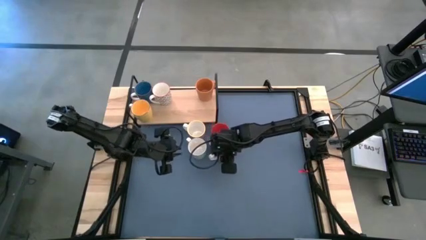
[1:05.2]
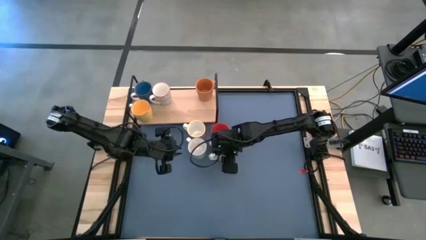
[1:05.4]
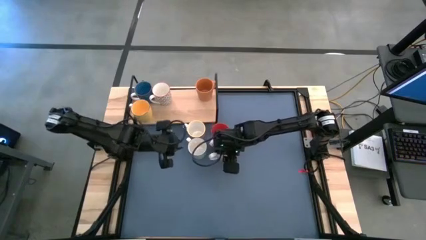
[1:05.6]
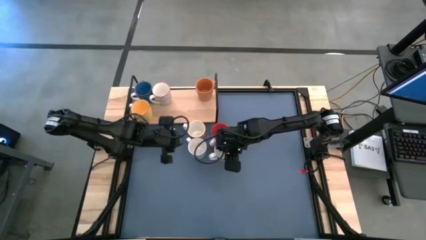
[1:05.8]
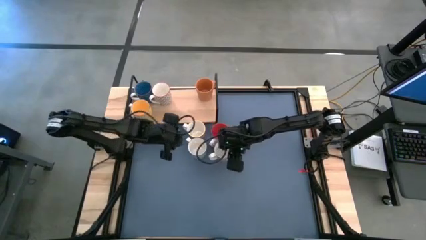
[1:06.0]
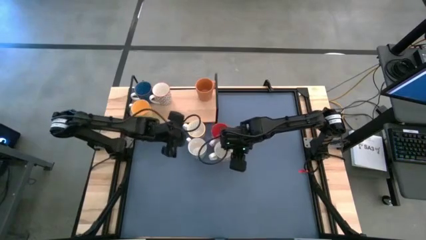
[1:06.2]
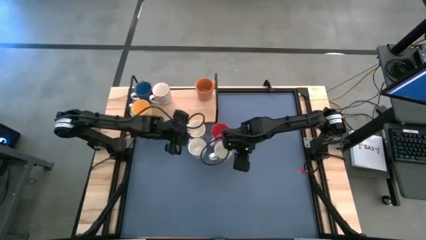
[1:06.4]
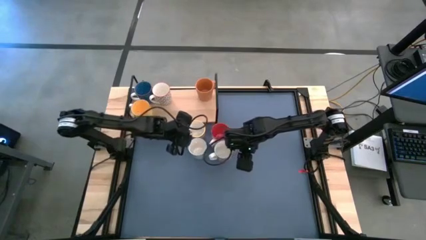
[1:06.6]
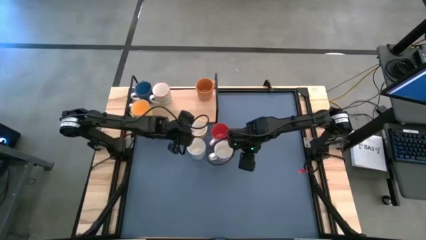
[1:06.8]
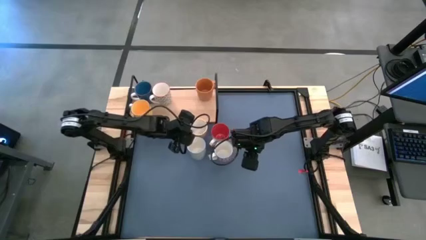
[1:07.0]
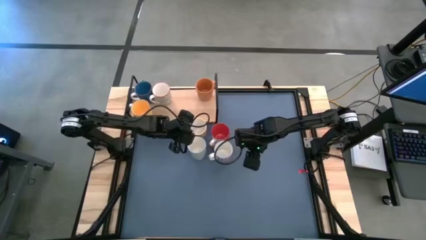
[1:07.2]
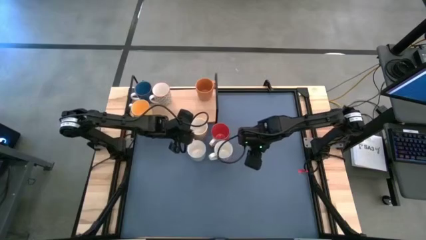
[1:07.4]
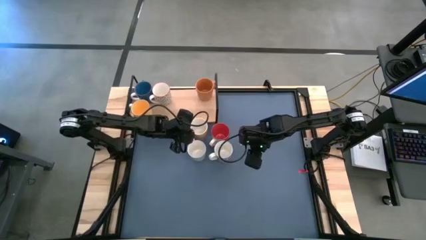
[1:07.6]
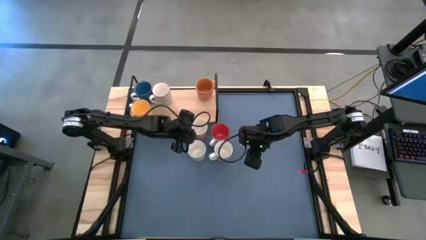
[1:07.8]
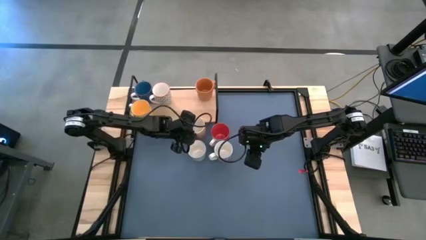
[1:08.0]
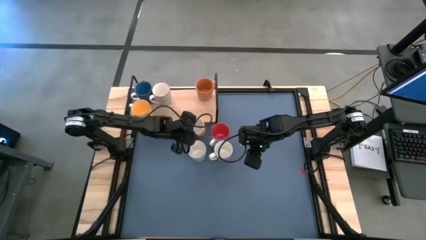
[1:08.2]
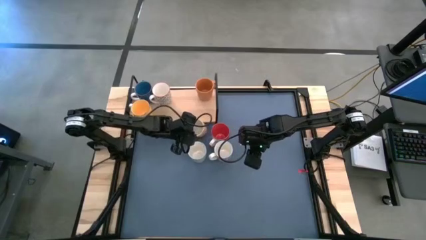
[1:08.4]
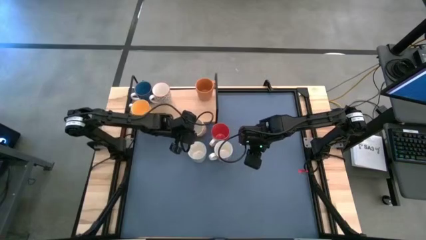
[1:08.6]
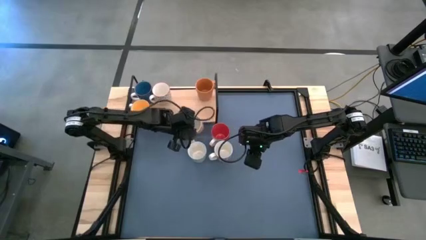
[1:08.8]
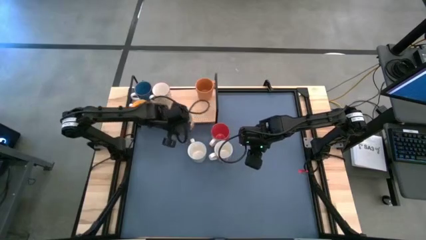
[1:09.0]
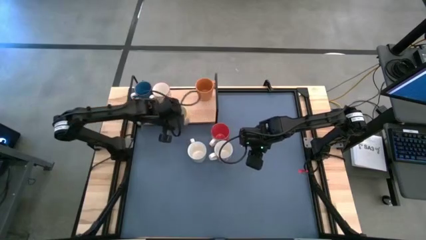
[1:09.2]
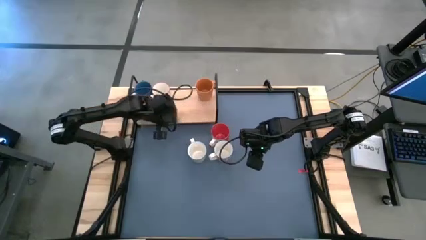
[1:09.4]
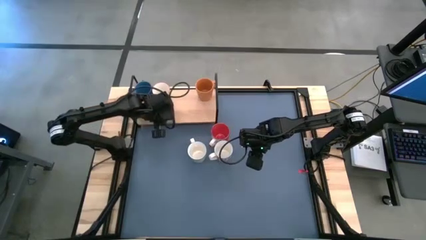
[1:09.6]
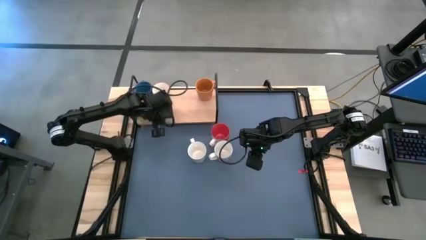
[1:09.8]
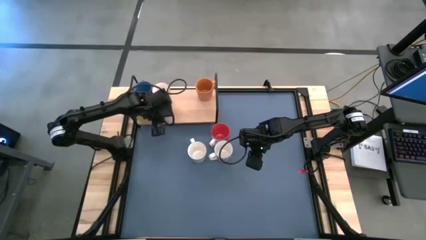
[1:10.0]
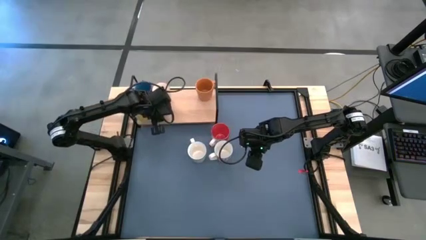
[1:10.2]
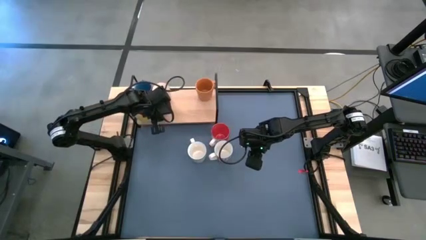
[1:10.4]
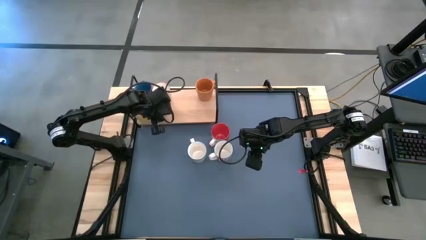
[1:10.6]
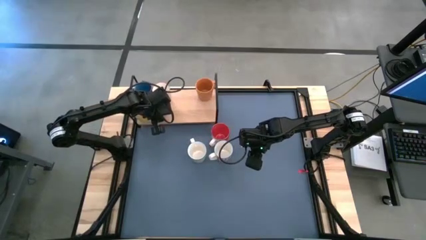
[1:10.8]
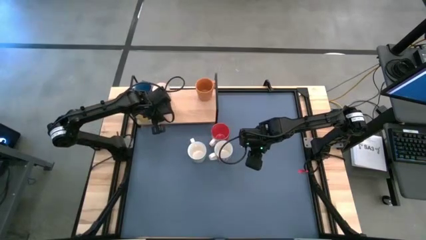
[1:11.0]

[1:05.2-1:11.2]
Task: Place coffee mugs
Put the brown patterned mug on the shelf

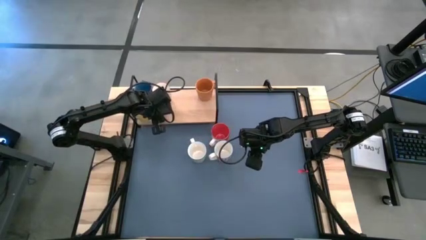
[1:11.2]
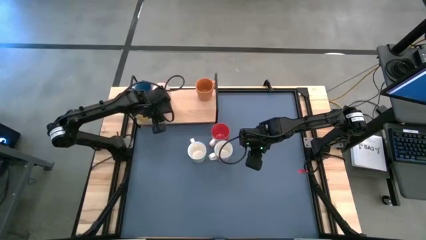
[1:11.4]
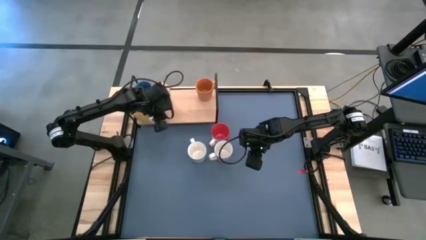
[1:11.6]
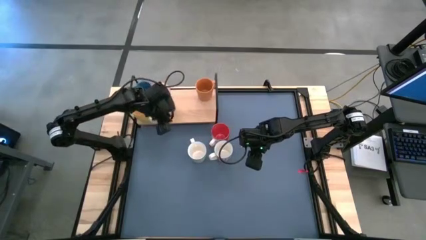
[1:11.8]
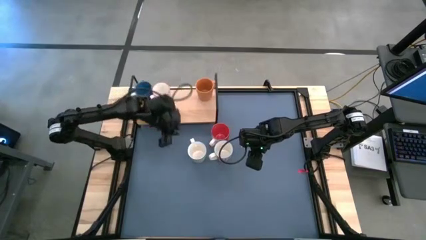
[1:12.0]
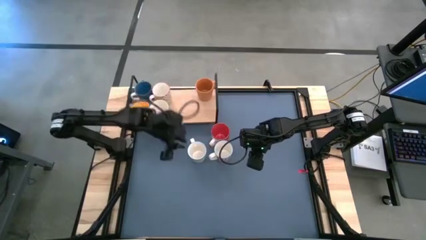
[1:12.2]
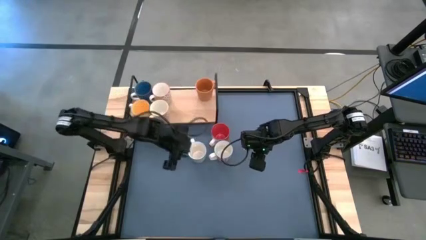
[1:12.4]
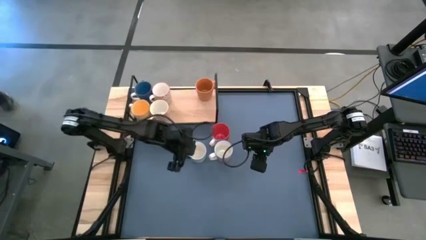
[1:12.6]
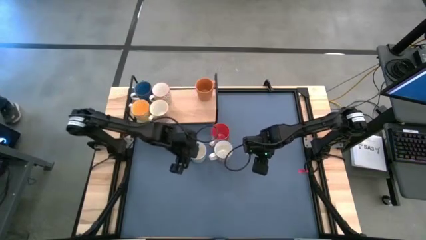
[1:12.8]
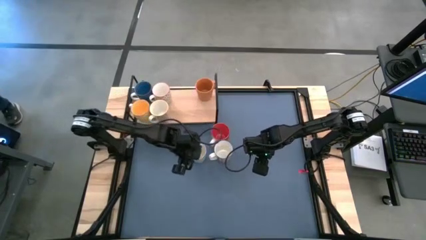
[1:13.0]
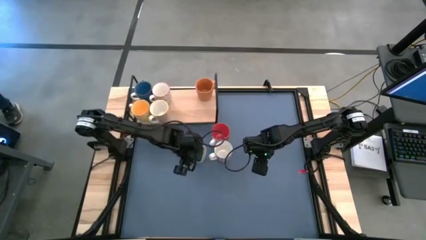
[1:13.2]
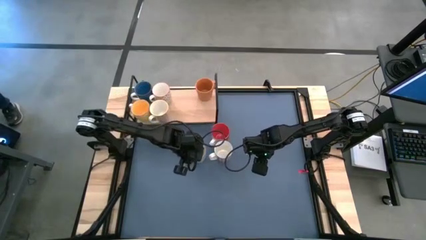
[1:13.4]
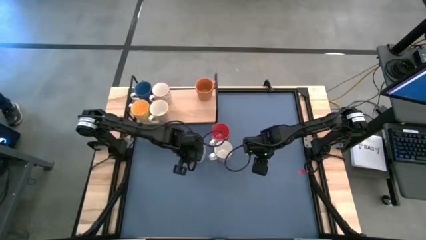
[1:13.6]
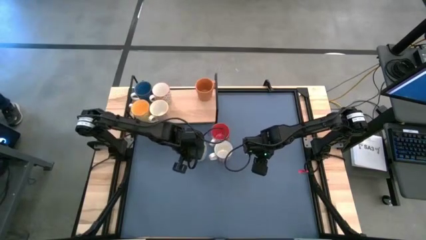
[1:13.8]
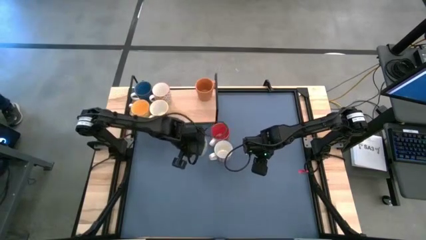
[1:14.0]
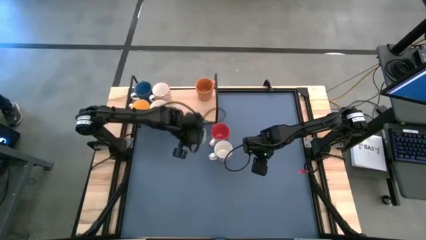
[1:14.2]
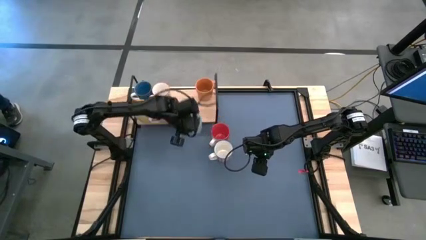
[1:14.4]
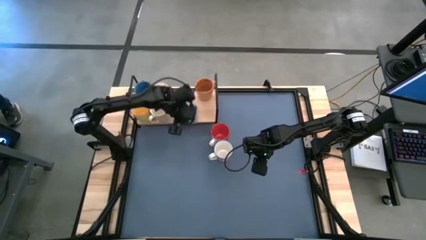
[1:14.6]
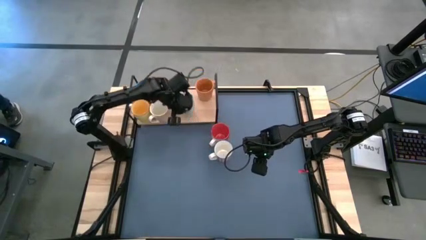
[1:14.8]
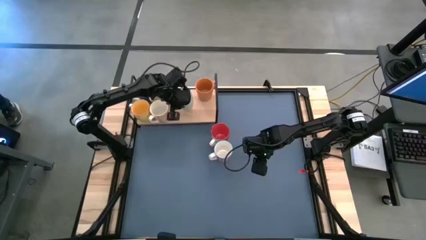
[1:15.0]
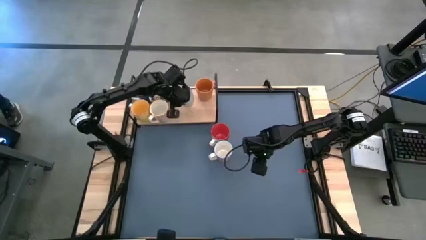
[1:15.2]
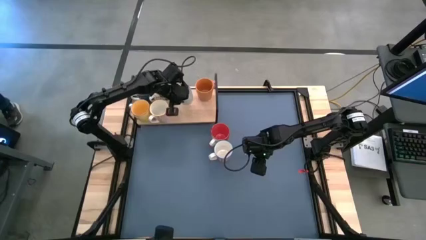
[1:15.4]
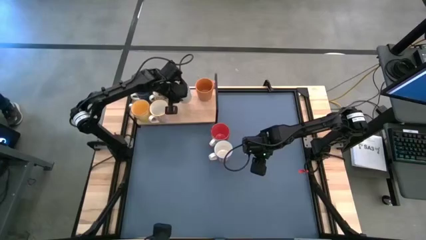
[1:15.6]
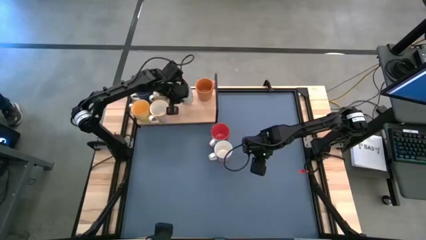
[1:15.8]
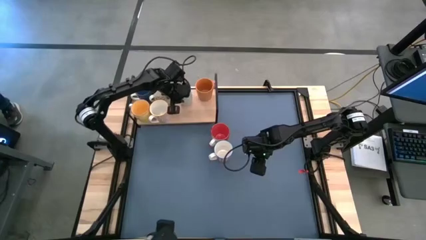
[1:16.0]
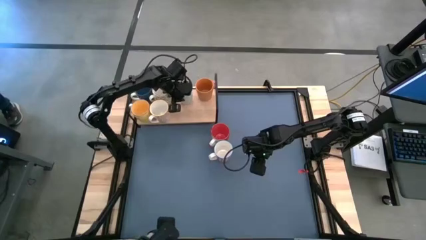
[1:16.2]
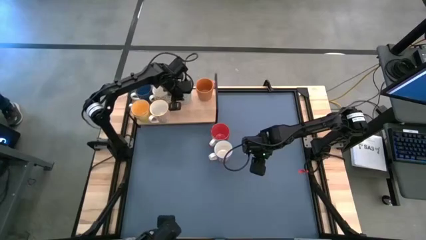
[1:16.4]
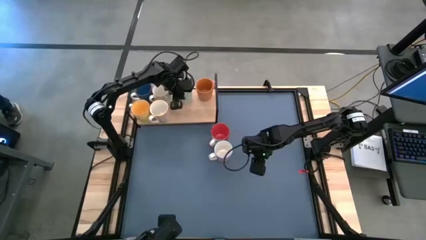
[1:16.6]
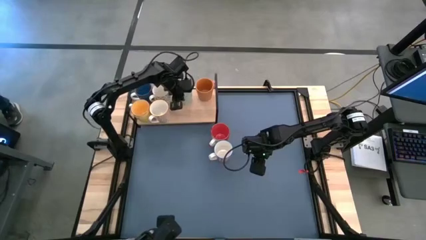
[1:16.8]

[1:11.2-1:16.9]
Put the green patterned mug on the shelf

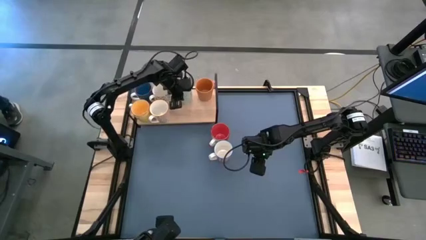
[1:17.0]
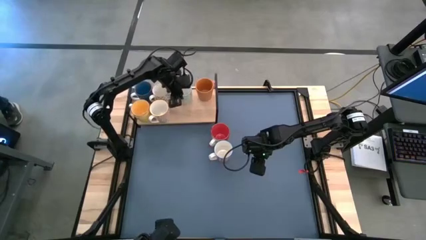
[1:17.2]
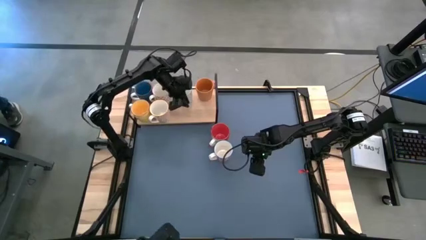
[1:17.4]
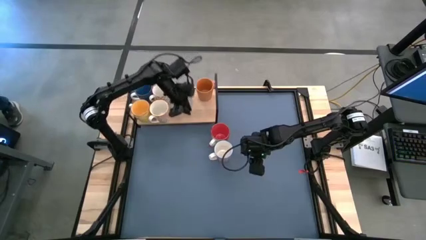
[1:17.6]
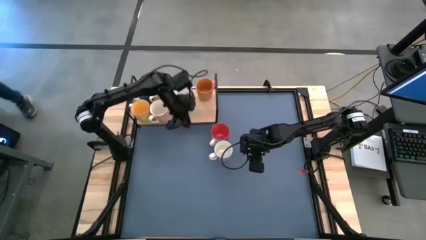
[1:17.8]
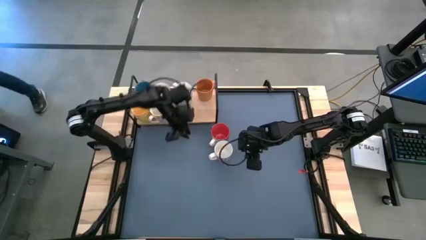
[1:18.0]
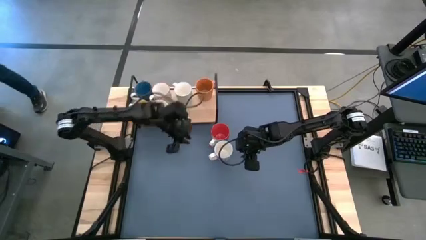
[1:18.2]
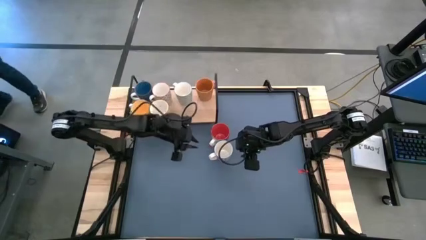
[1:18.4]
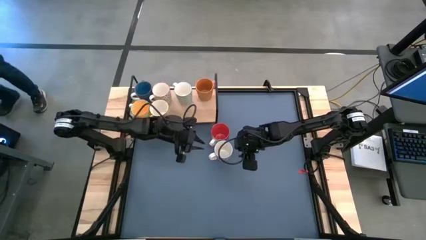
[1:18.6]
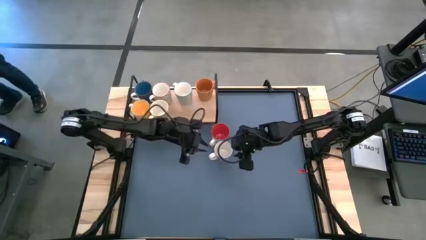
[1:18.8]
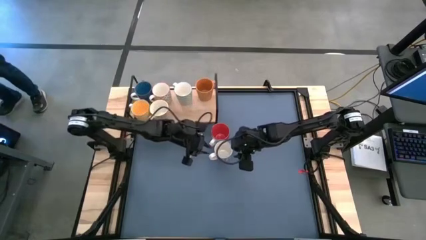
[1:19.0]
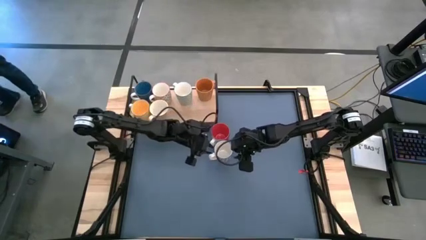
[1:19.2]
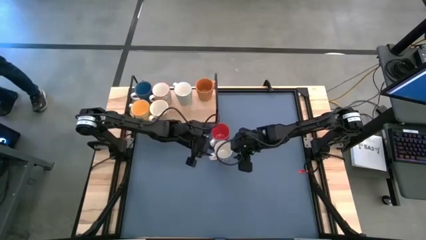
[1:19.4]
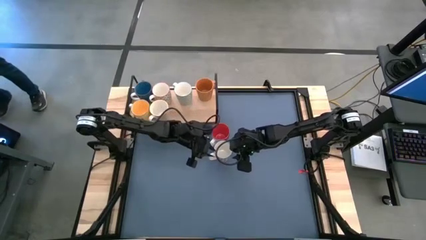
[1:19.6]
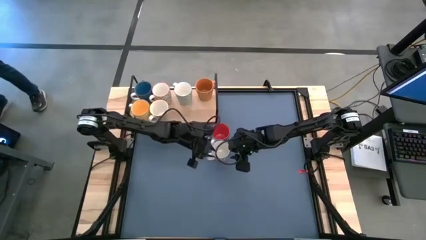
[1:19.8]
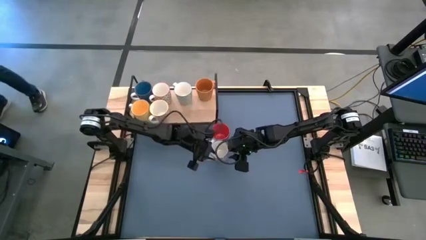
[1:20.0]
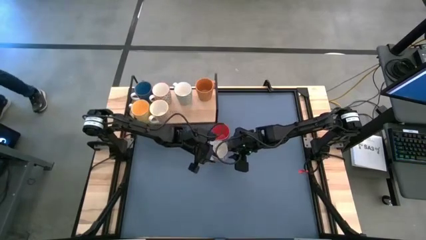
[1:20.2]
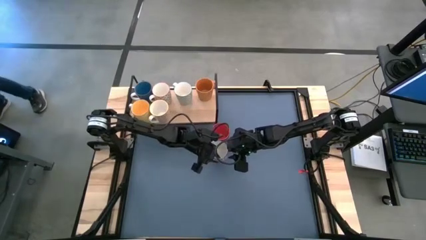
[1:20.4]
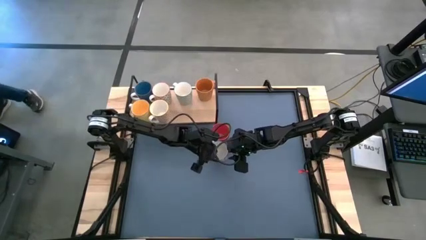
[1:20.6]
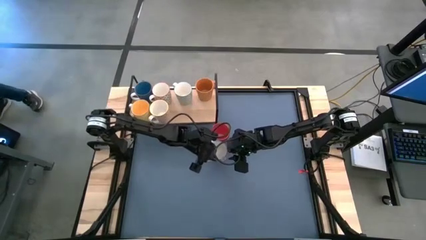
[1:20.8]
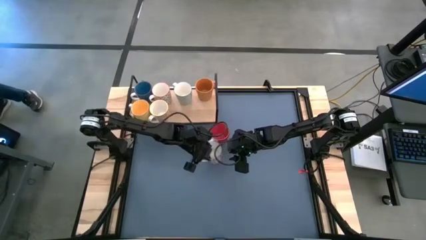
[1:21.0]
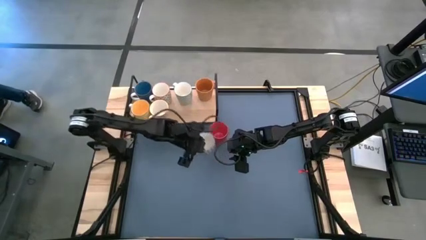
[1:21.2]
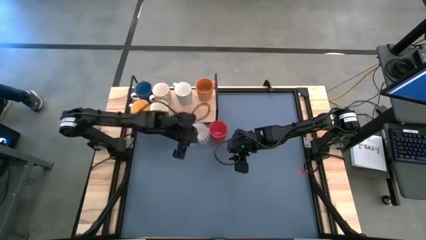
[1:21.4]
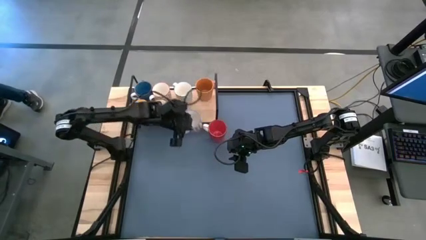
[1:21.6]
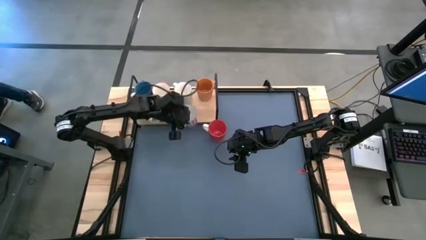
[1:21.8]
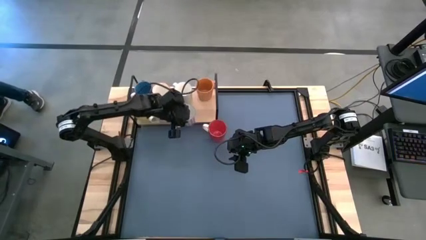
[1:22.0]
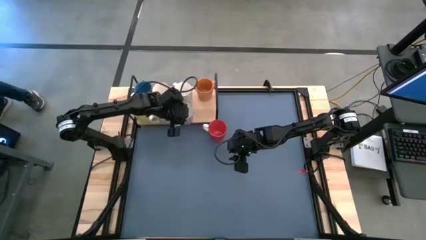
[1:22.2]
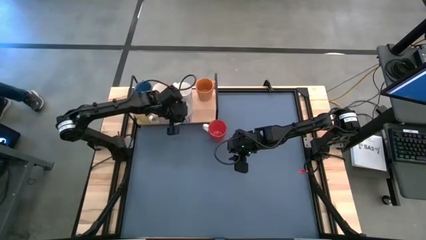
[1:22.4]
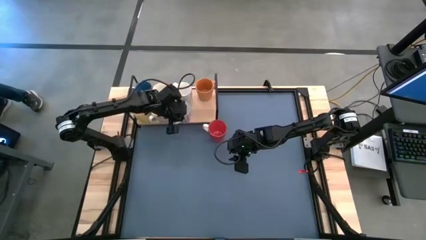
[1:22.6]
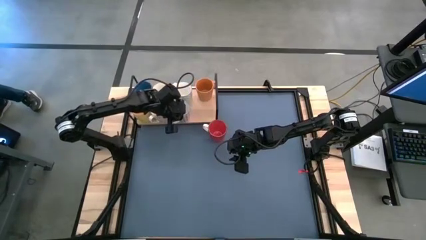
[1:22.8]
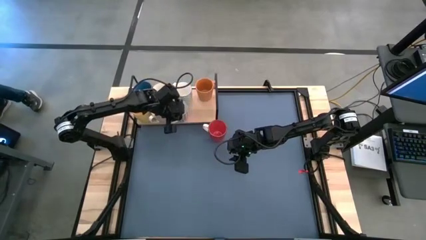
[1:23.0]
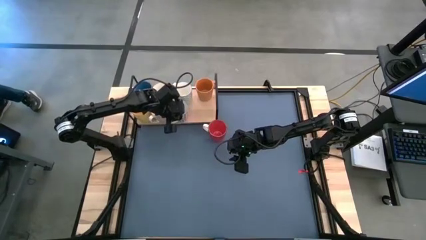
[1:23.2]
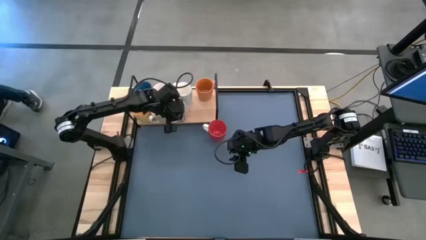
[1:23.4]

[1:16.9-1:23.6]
Put the red patterned mug on the shelf
